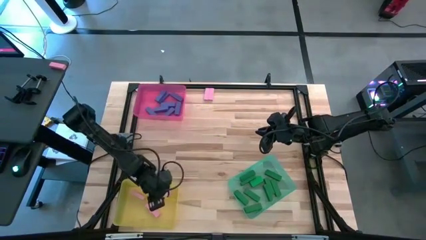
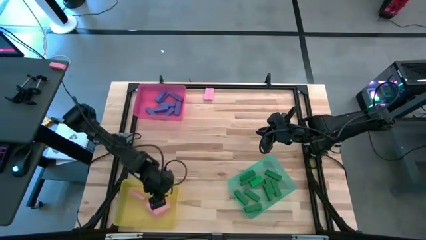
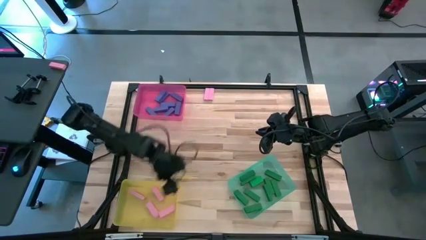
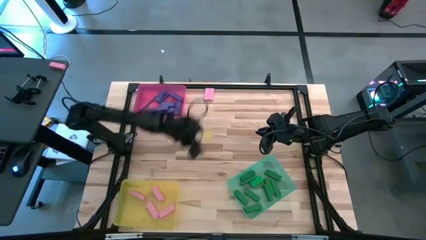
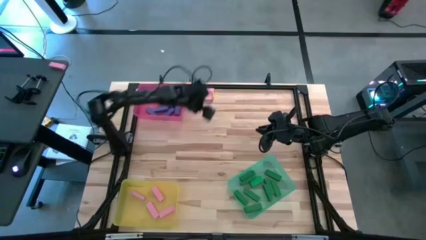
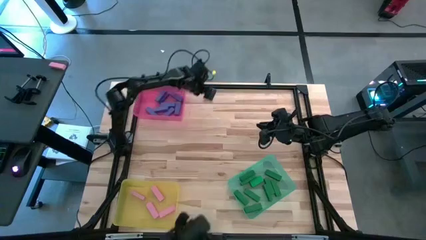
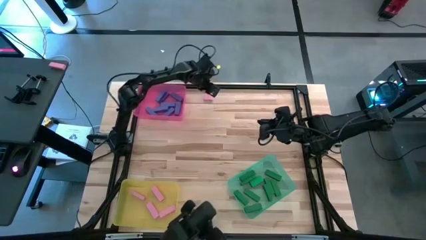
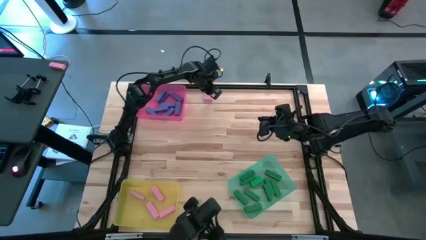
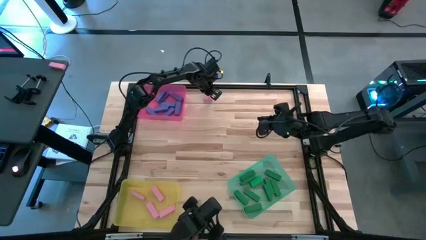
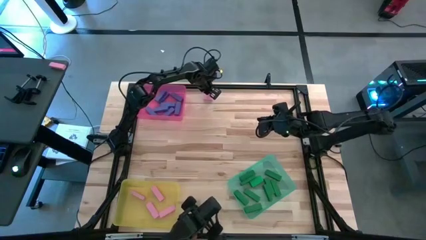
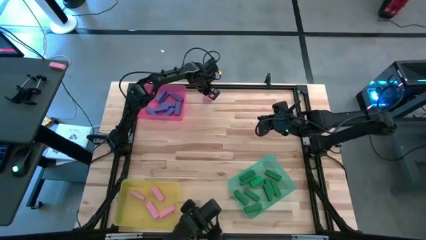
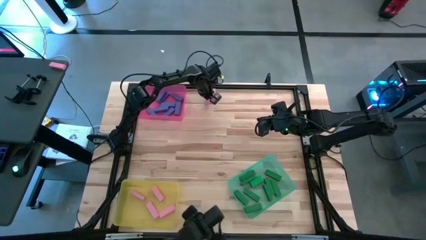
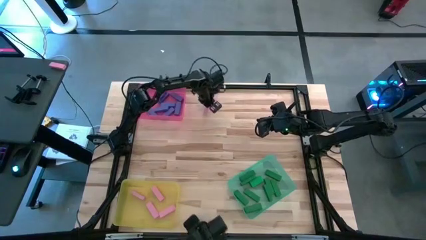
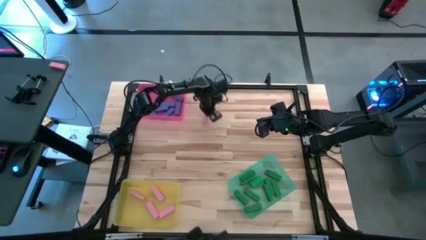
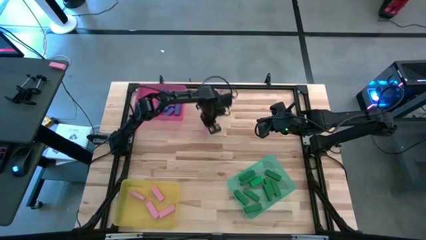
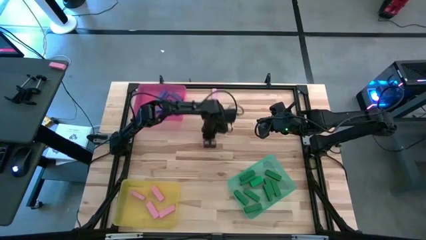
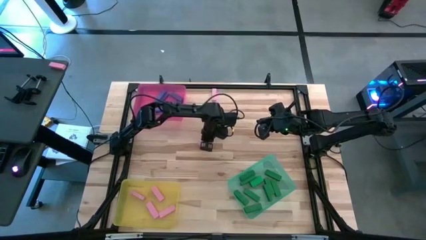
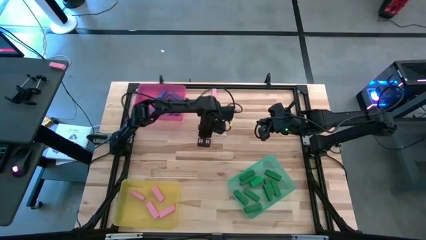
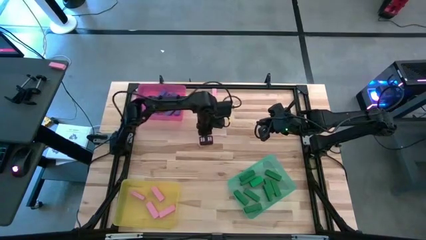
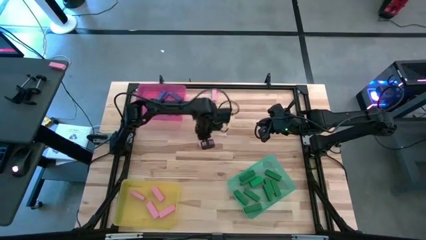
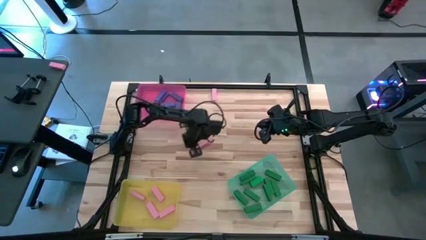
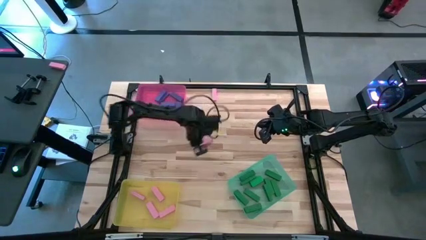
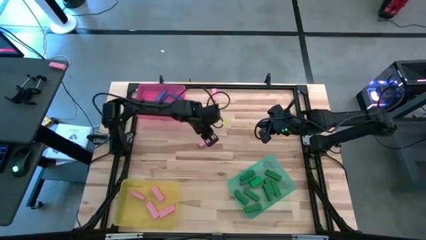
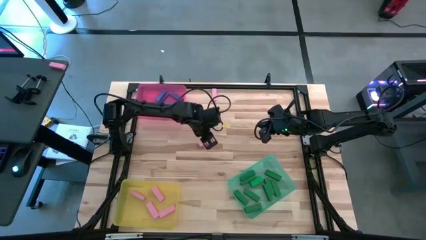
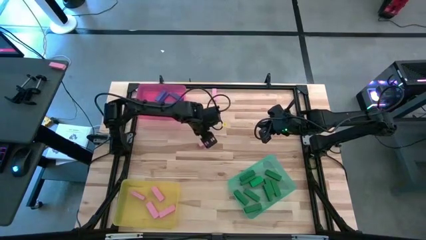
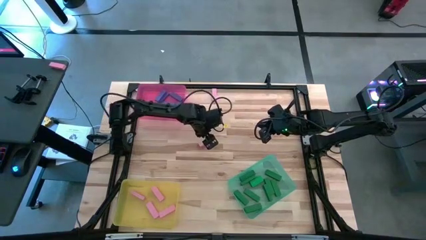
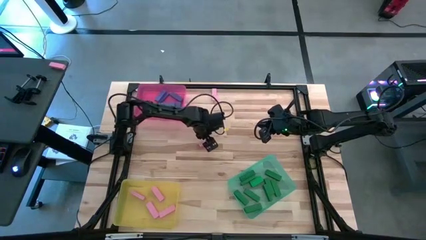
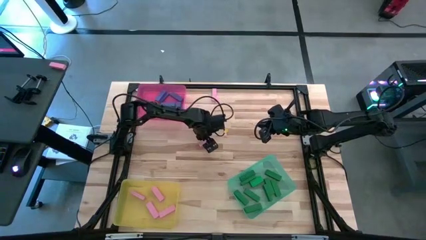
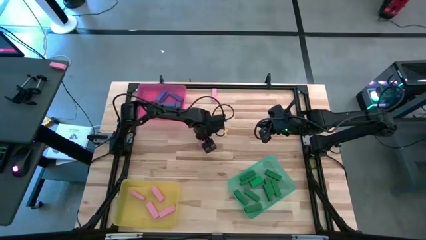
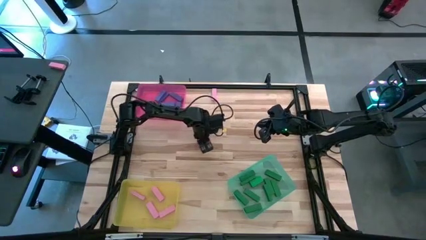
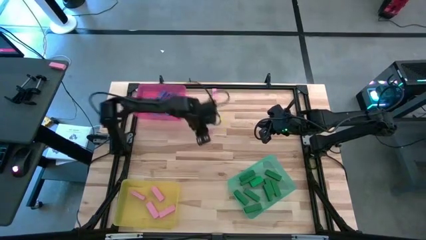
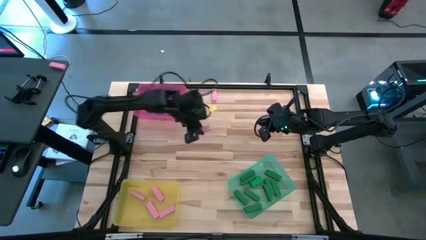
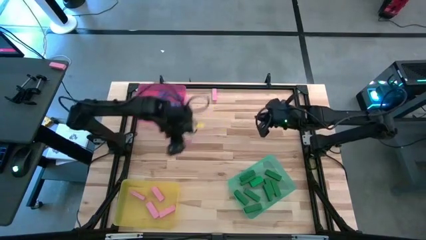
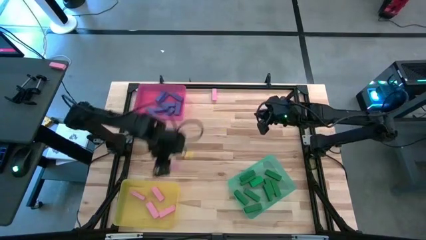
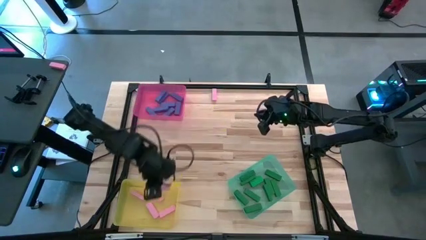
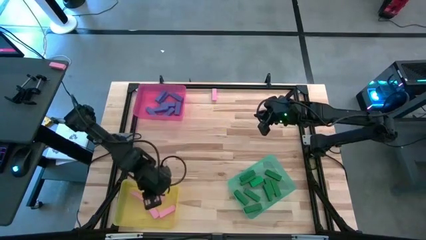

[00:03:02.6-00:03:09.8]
Task: Sort blocks
Put the pink block into the yellow bin

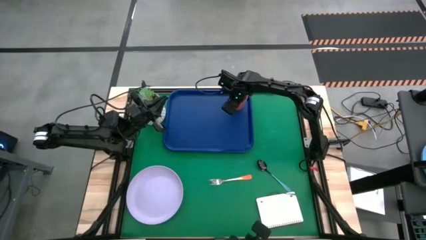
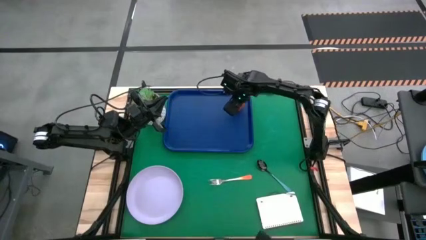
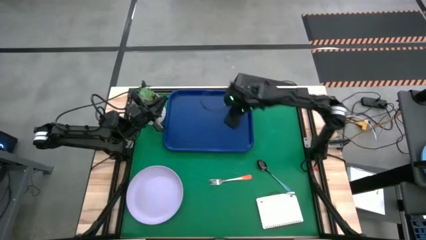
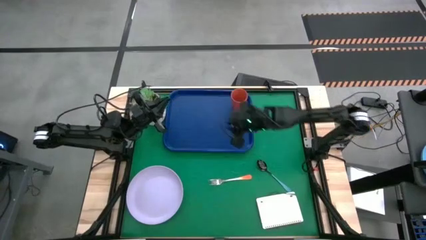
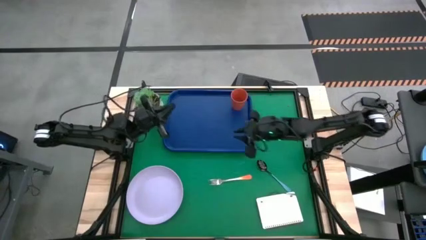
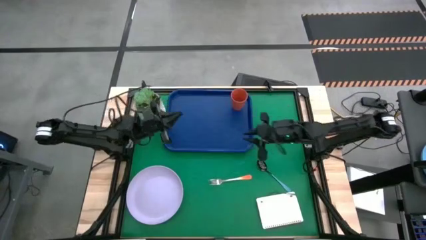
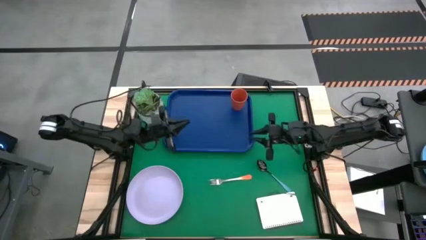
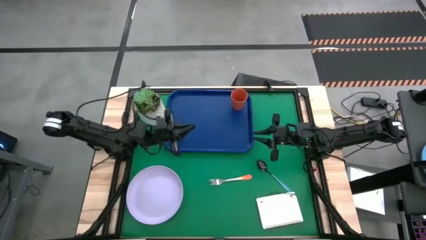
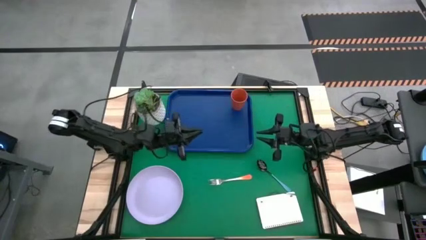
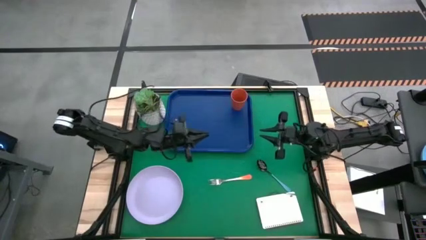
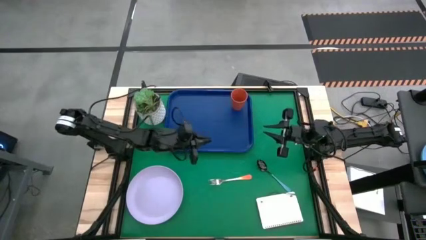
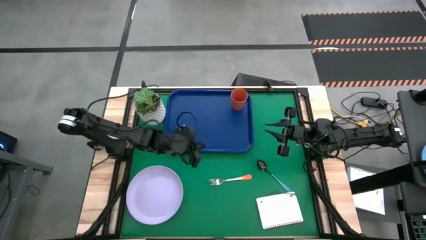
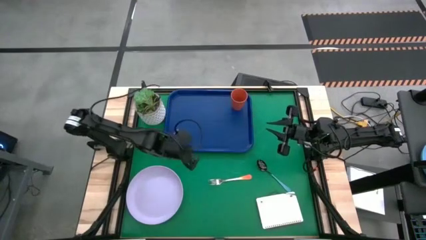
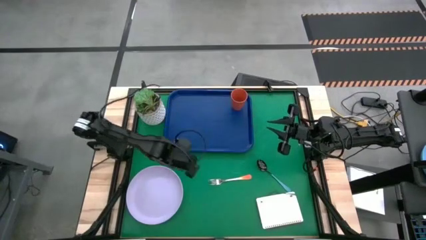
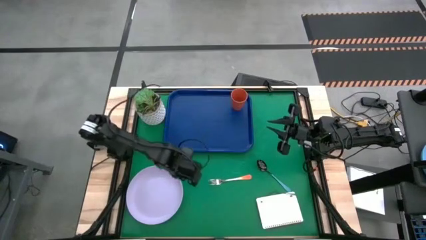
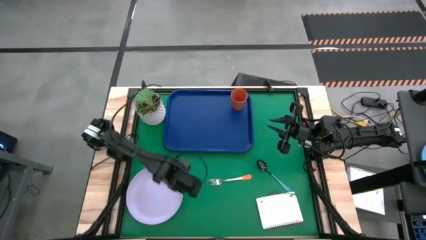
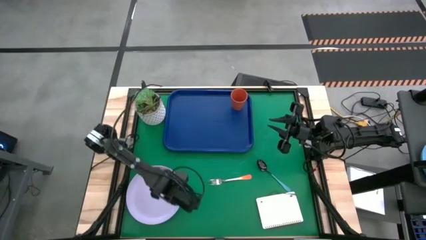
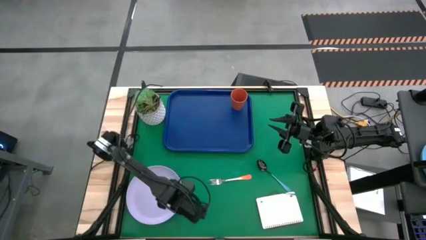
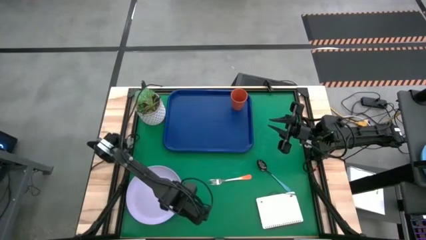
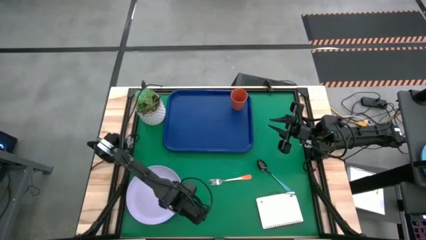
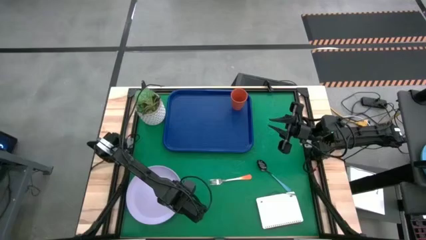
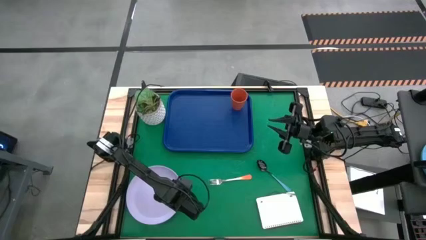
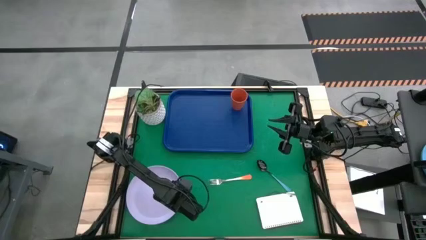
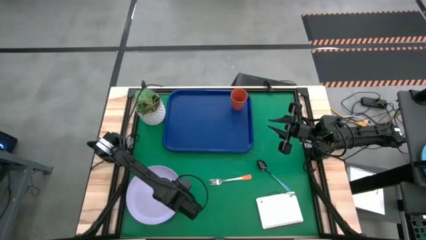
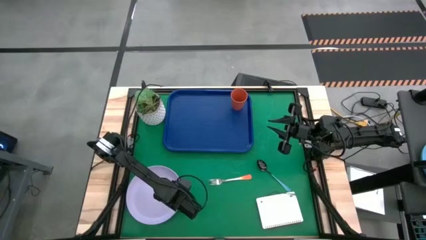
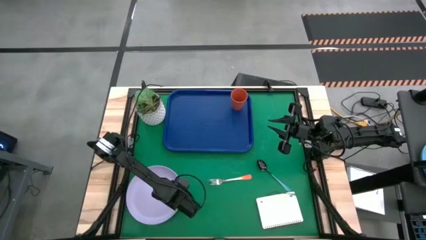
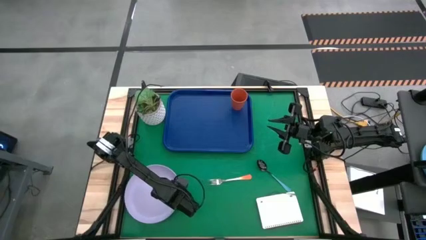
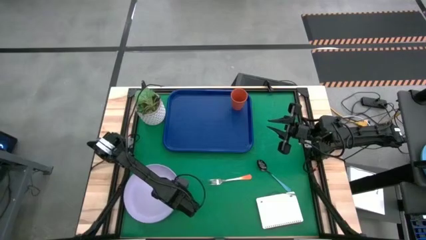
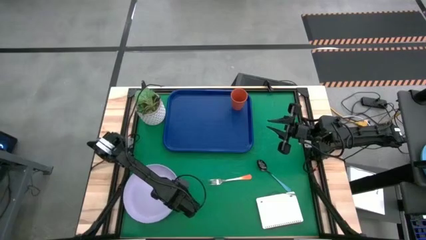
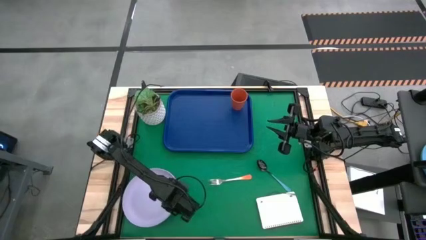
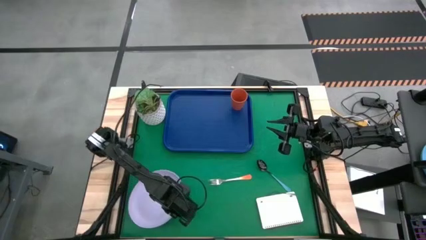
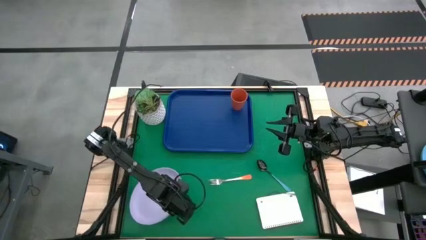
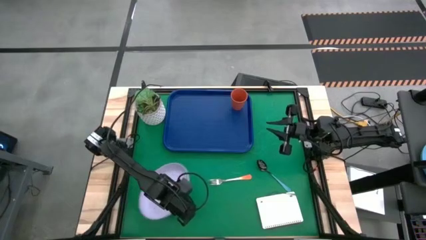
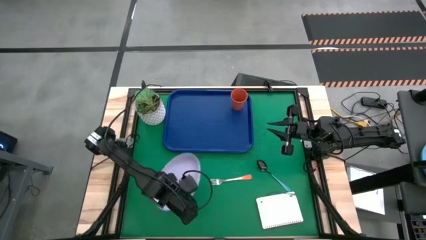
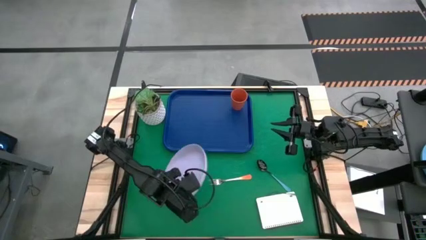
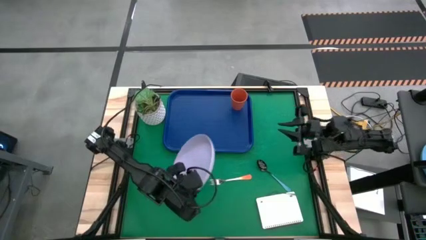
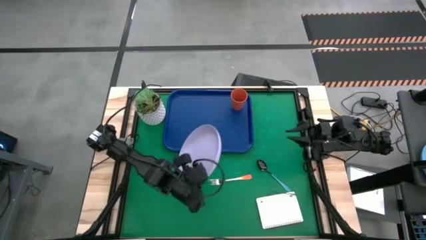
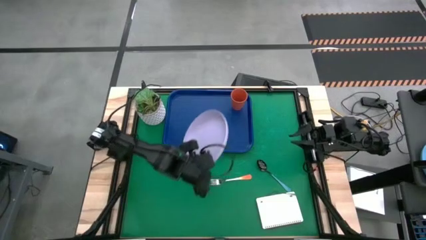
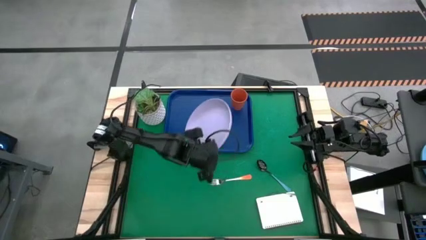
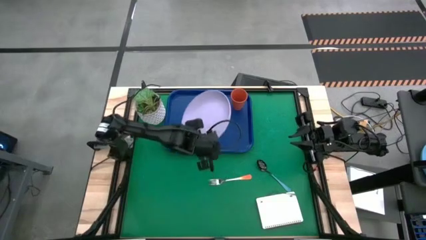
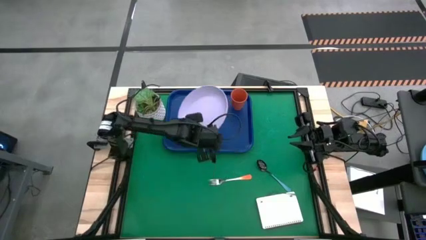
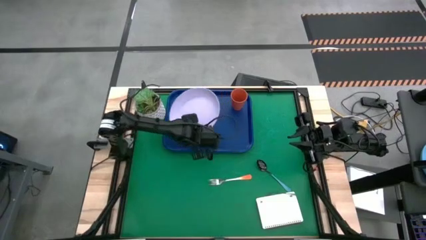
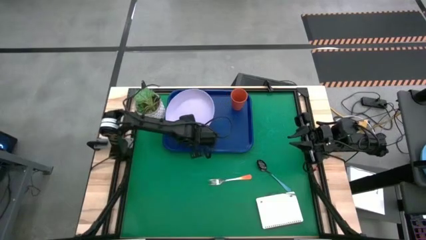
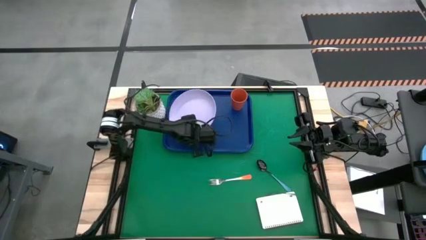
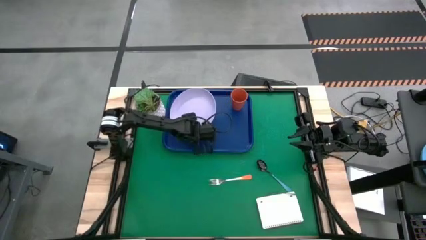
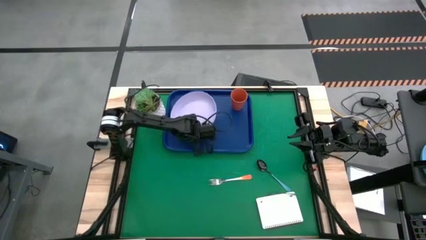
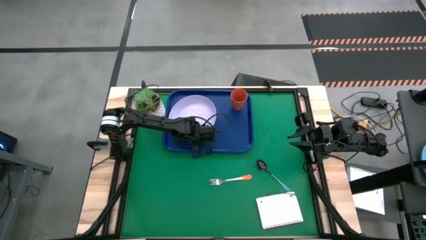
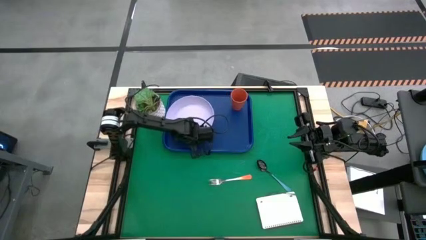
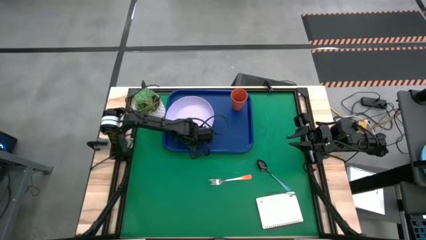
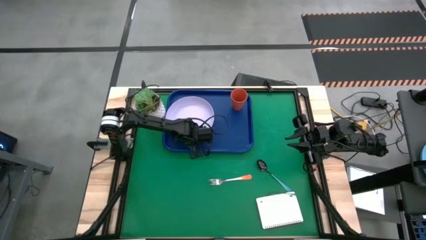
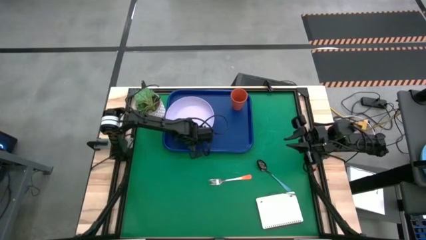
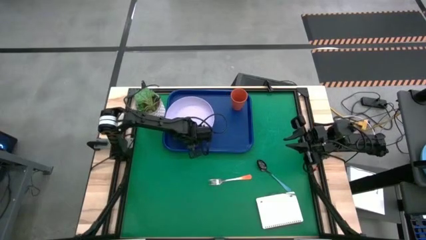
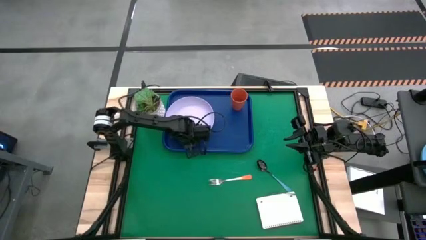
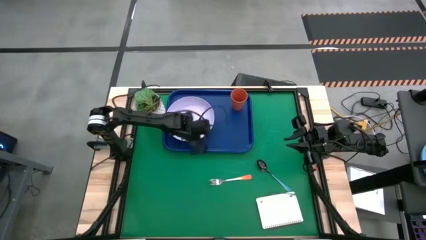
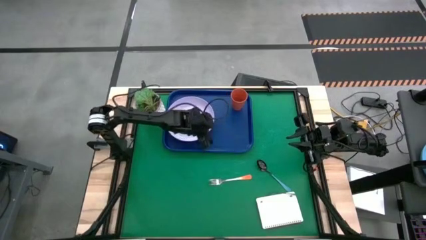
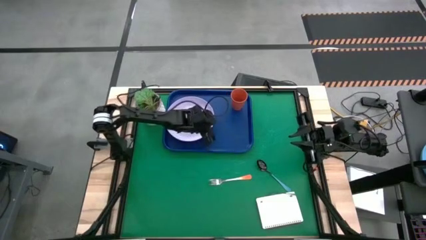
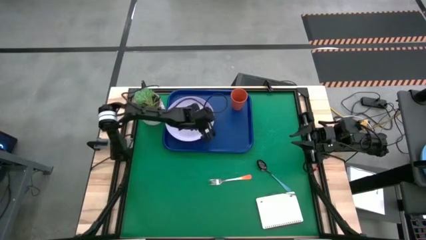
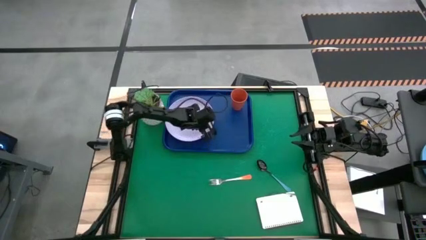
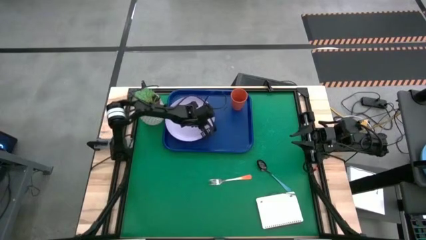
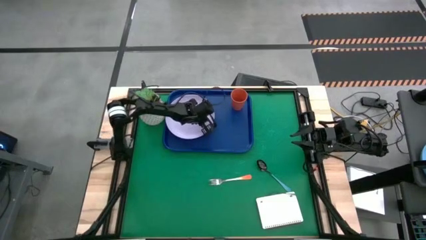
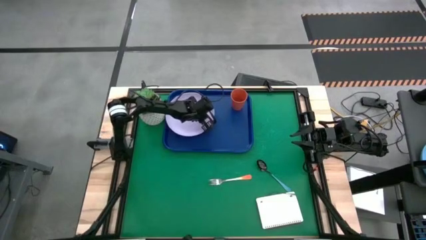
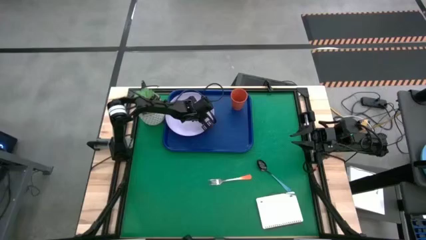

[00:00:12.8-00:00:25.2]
Task: Pick and place plate/cup/fork/spoon on tray
Put the purple plate on the blue serving tray to the right of the orange cup
